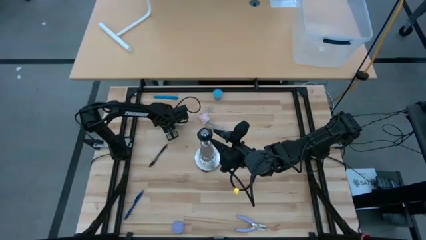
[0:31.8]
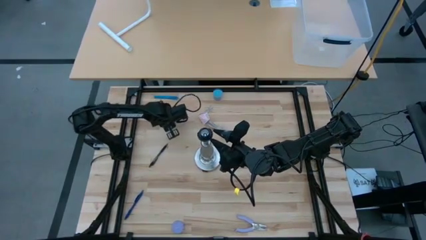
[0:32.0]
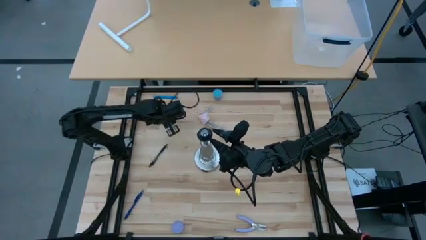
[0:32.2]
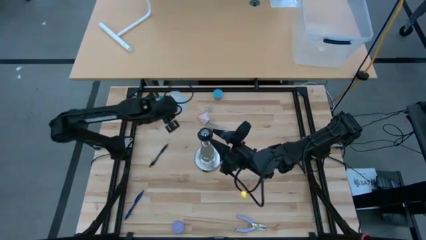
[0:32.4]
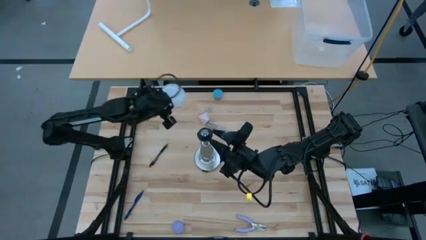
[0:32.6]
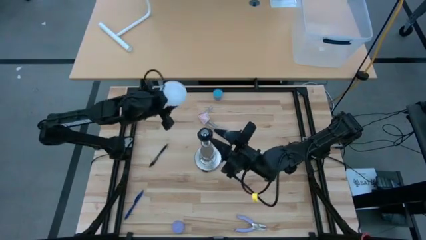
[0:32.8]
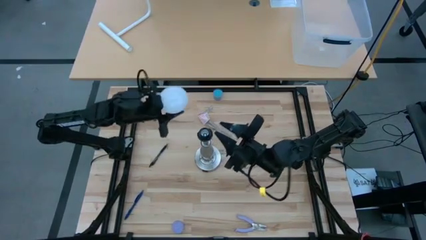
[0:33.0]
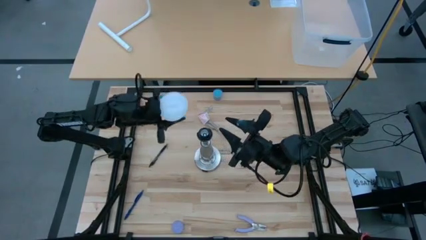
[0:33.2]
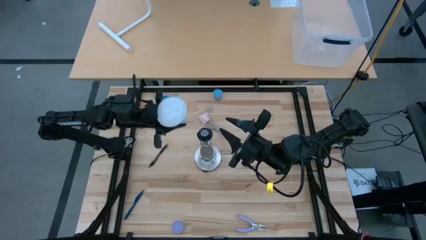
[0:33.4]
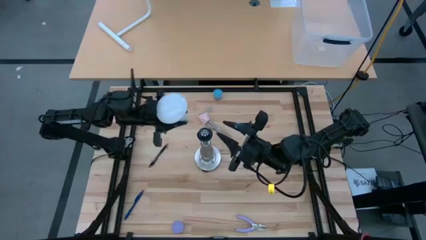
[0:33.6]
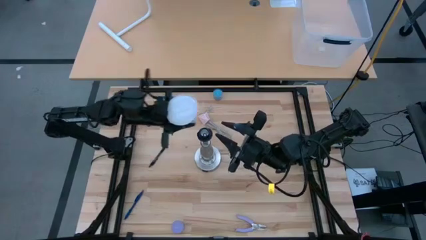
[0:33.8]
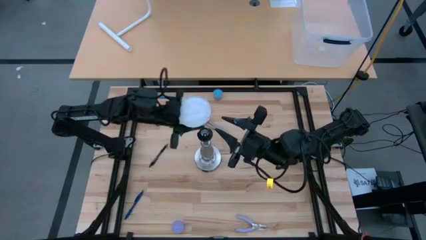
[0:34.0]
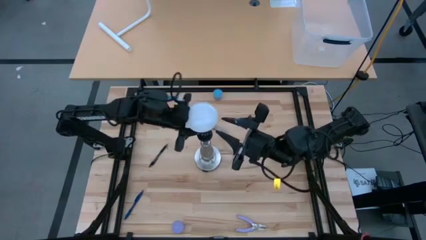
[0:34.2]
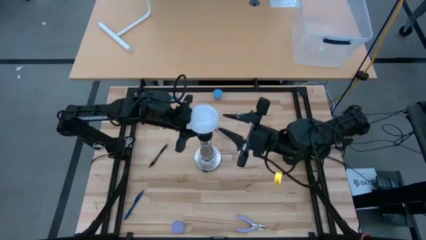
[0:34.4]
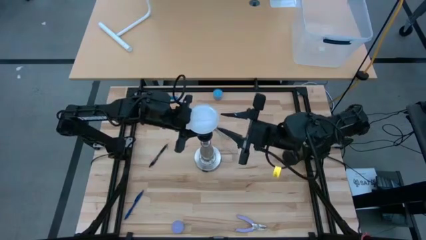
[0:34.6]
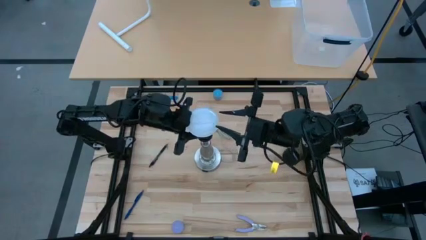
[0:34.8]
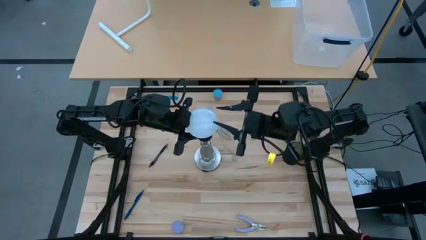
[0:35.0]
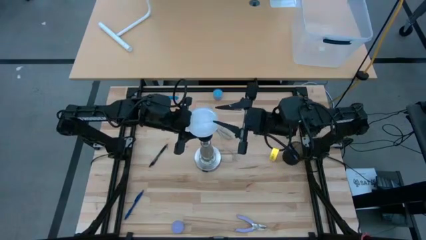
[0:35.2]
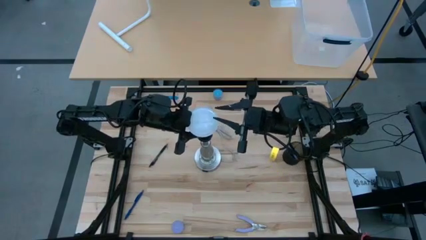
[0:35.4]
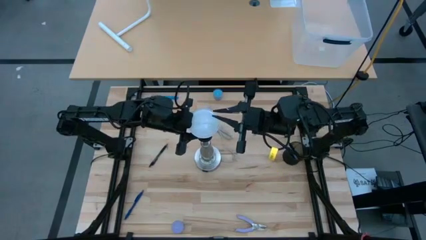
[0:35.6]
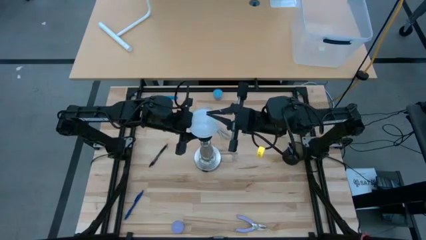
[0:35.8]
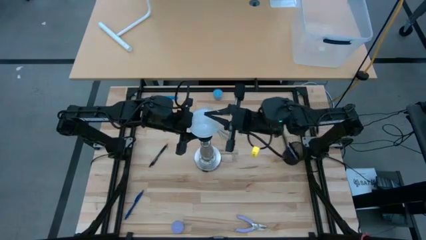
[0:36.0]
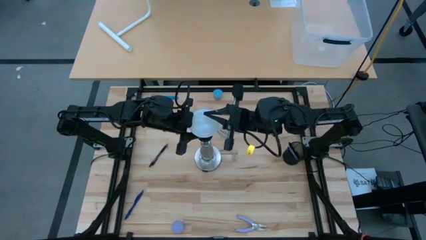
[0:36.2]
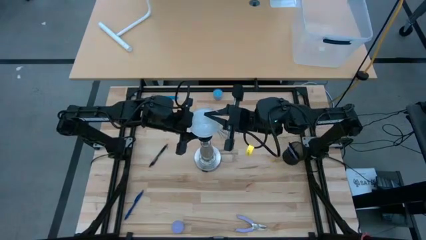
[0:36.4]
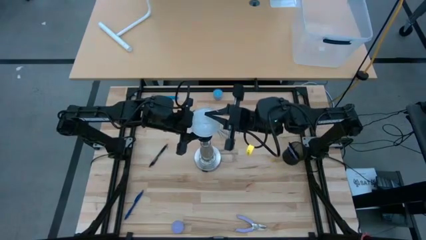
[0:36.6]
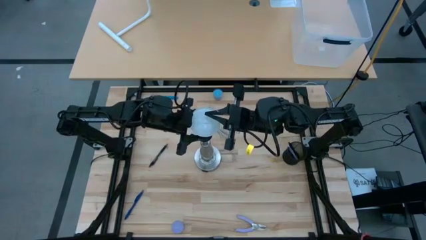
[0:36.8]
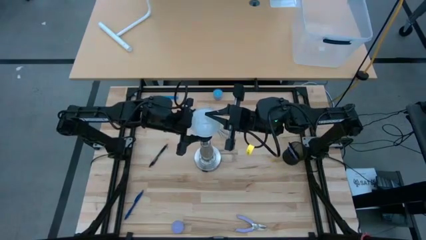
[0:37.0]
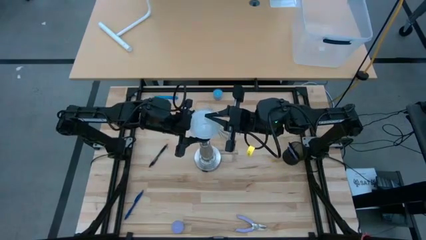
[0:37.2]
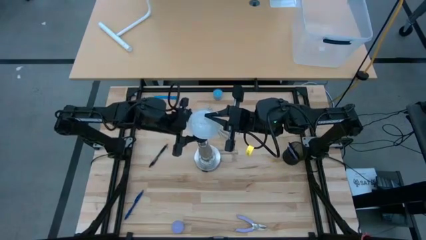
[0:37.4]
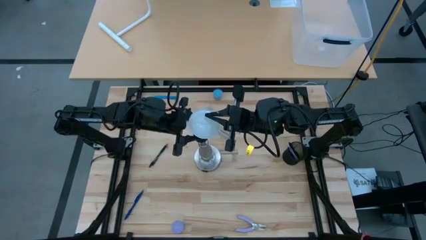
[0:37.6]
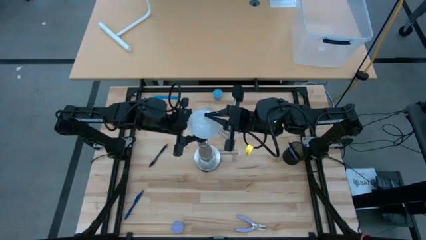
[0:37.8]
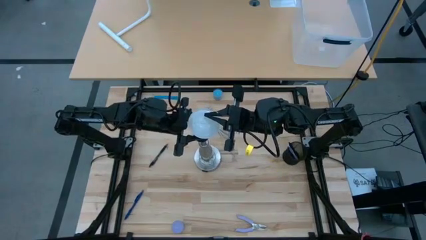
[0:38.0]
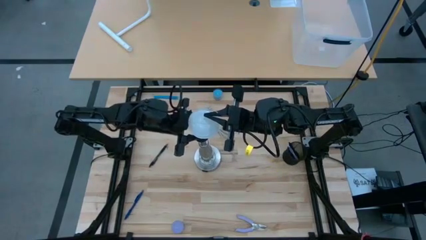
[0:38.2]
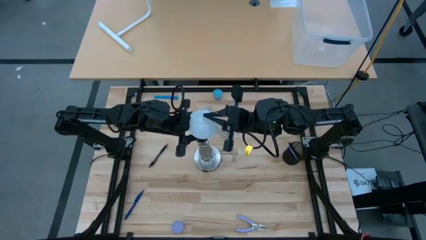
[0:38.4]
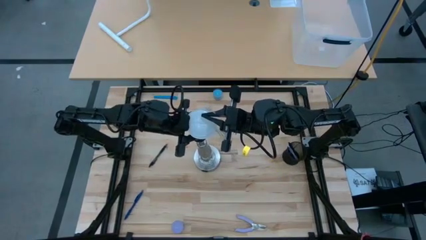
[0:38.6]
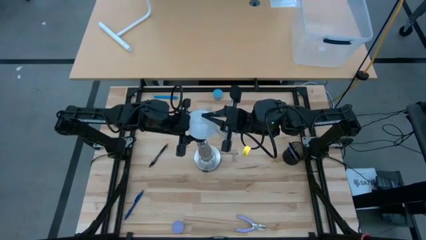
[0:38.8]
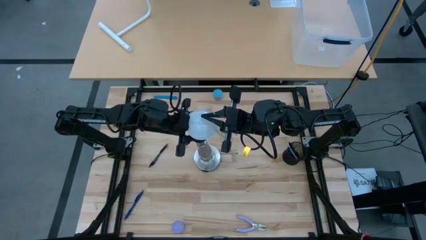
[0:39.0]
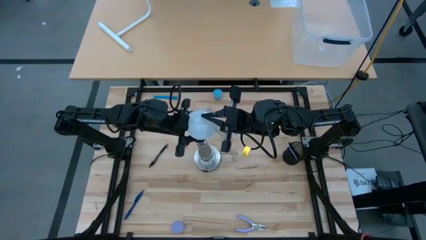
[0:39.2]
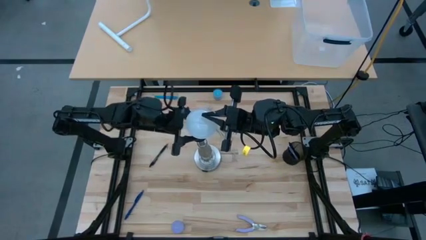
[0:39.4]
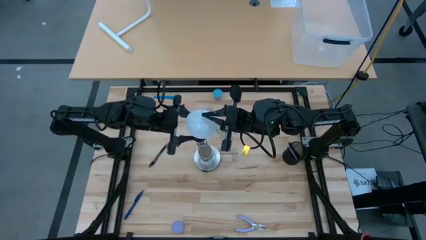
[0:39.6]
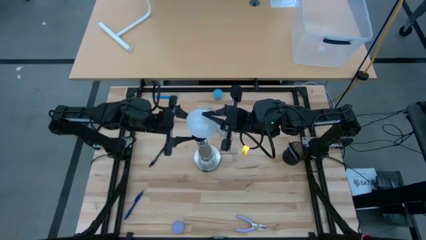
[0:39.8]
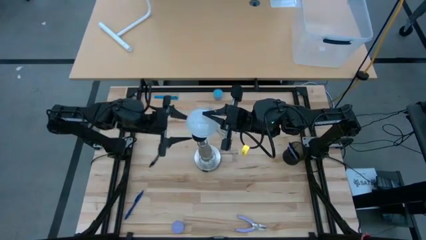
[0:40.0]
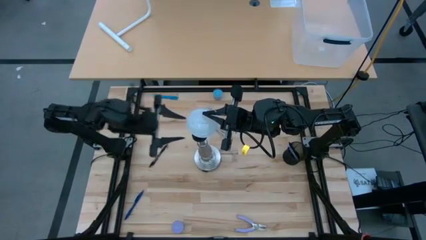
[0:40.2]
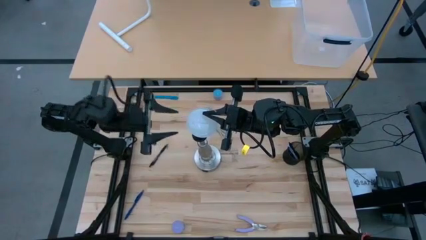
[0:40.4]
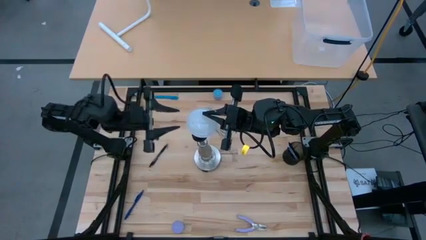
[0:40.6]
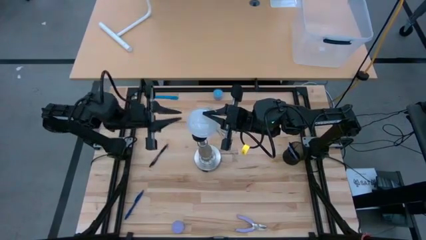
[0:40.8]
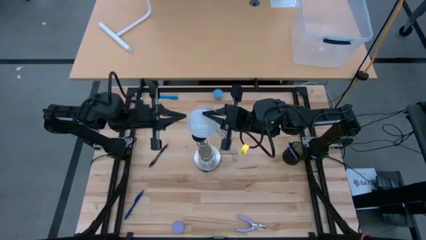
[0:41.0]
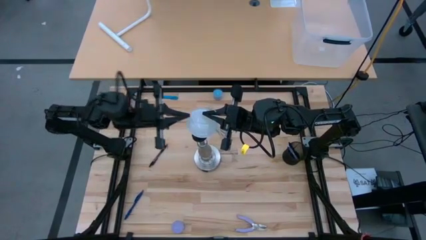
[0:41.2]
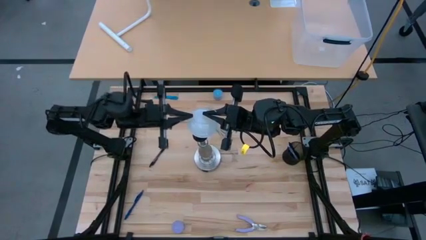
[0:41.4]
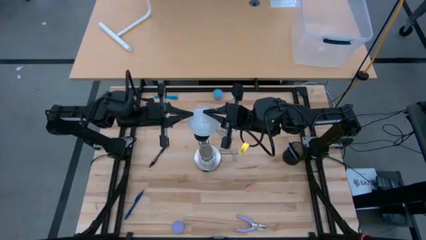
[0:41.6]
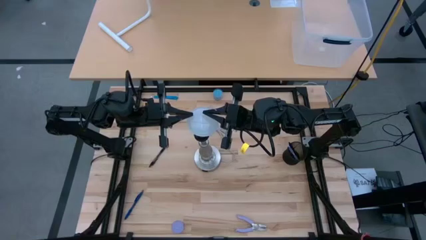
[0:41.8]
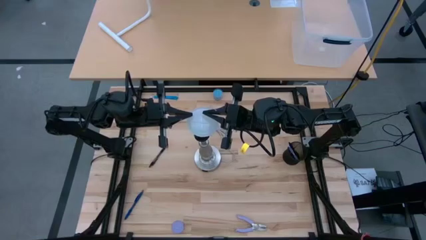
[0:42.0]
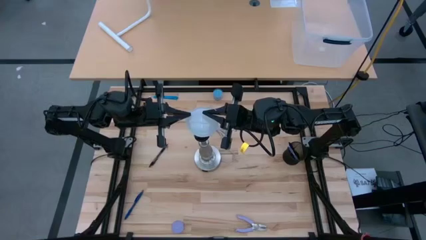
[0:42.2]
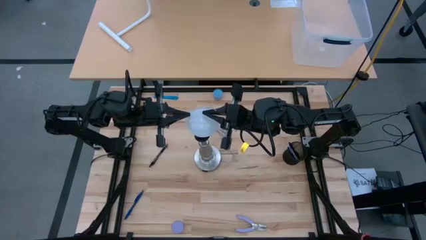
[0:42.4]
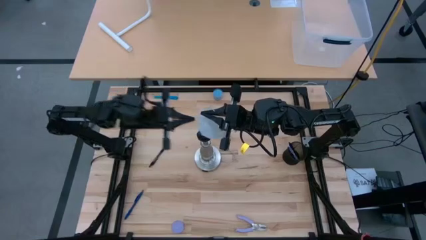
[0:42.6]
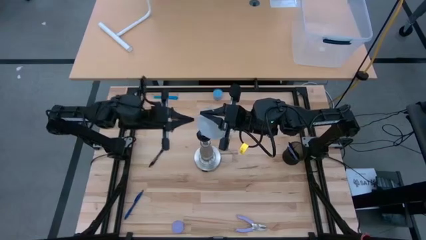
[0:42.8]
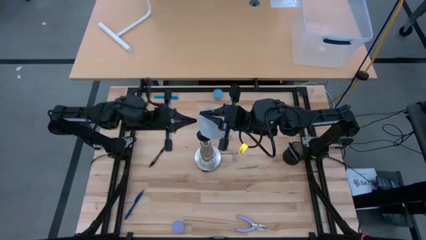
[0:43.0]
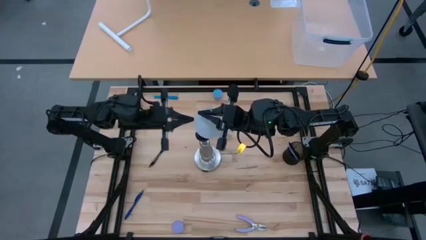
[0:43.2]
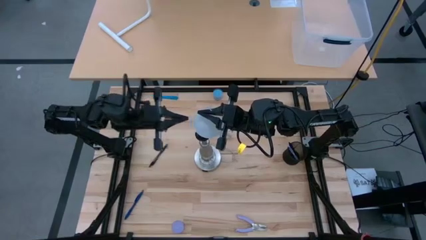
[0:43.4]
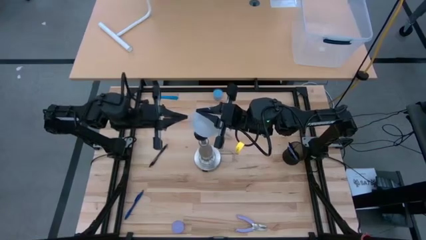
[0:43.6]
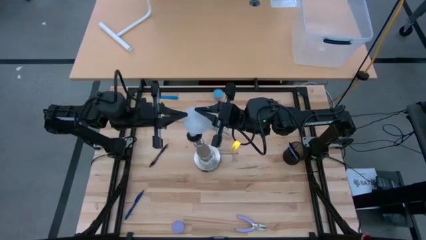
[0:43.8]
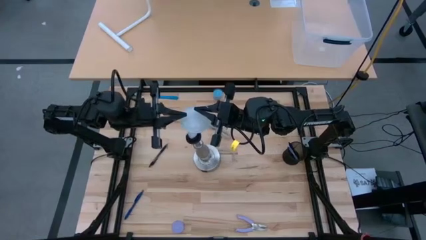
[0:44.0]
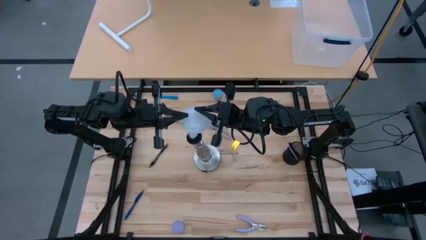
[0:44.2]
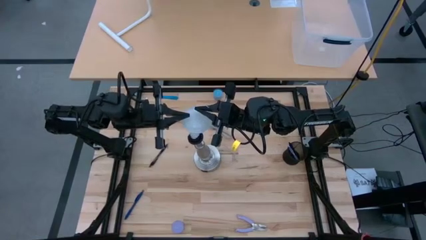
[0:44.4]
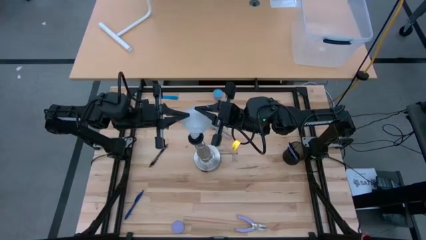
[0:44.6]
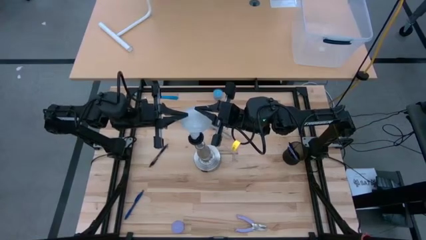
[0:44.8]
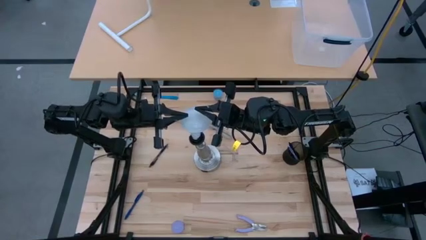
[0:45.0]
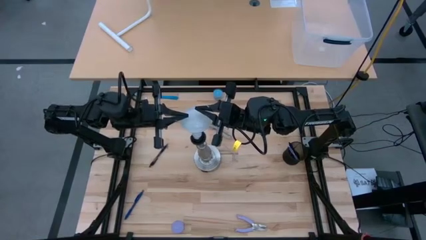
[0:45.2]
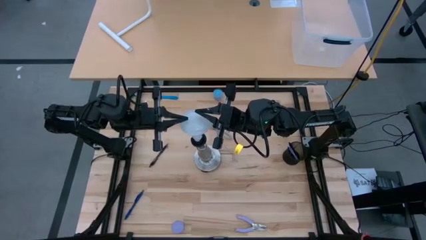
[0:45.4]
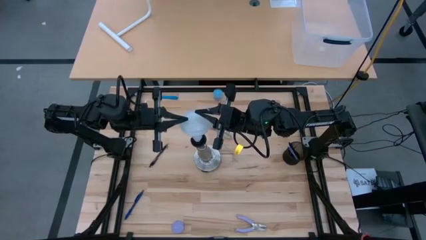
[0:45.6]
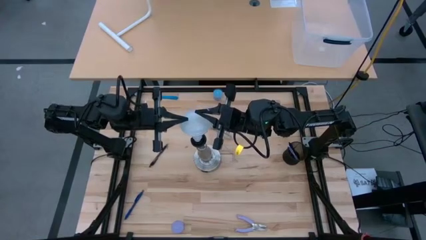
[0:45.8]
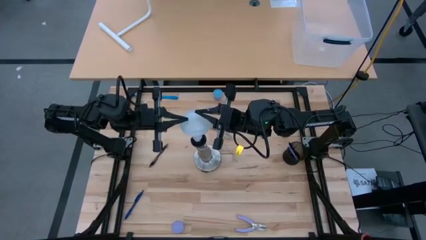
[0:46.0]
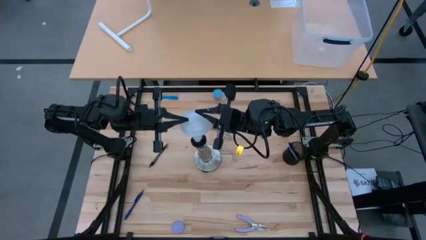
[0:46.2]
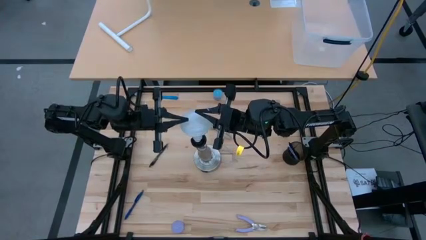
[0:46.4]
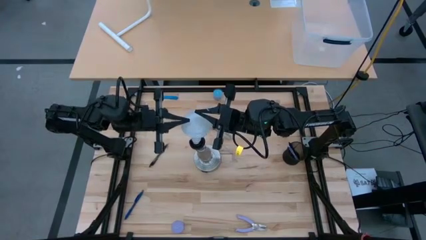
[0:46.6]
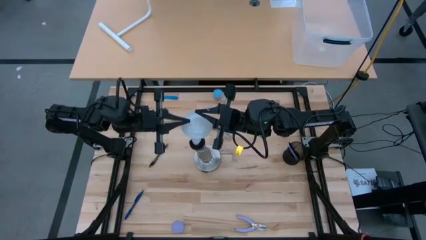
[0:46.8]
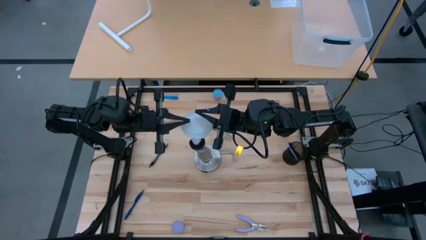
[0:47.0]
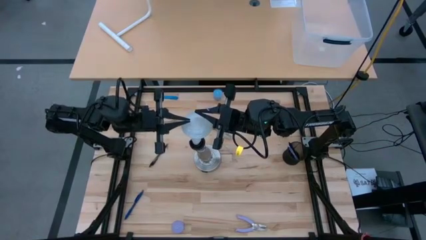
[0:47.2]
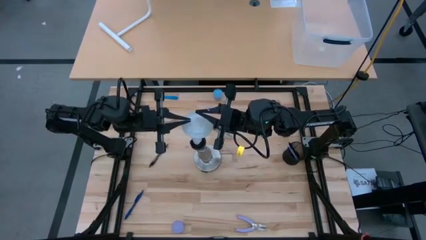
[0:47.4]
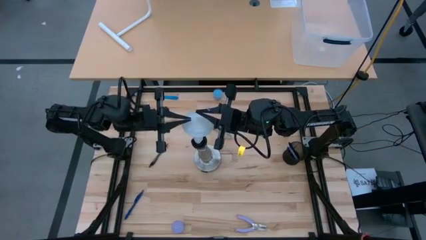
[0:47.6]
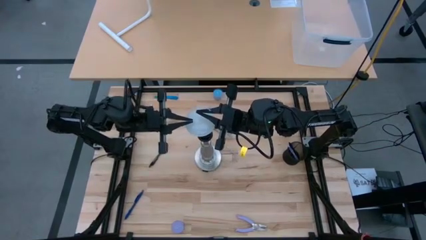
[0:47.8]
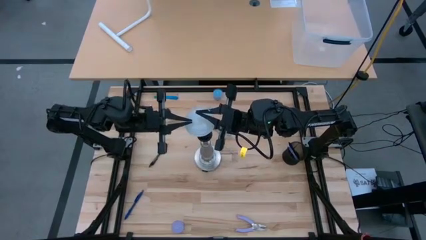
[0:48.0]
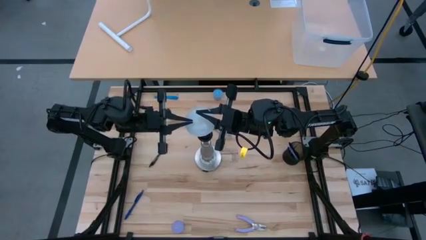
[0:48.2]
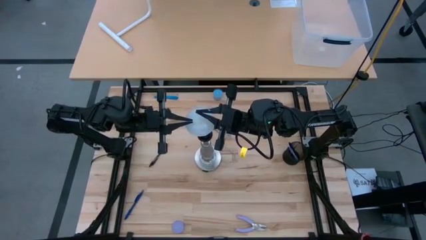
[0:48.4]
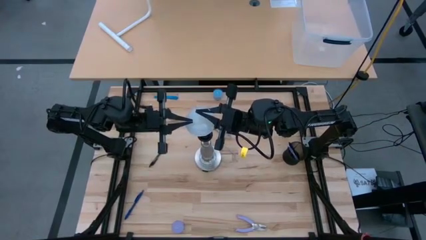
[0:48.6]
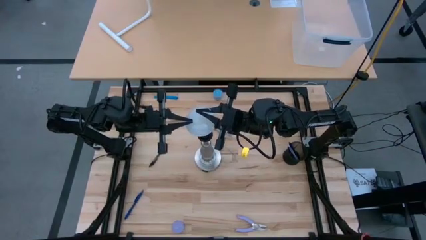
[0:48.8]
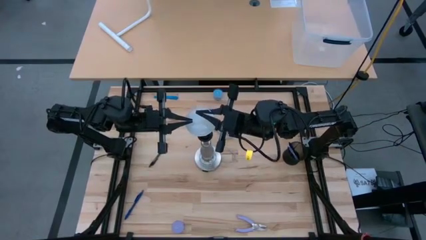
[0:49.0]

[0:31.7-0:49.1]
Task: Screw lightbulb
Insert the lightbulb into the lamp
